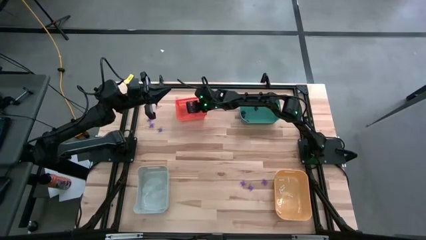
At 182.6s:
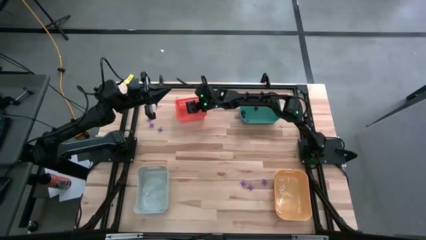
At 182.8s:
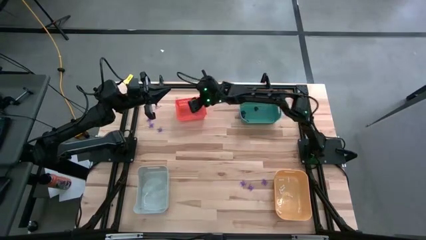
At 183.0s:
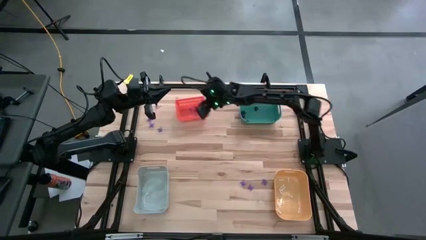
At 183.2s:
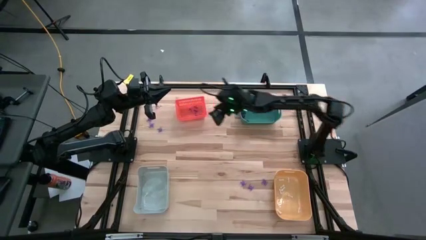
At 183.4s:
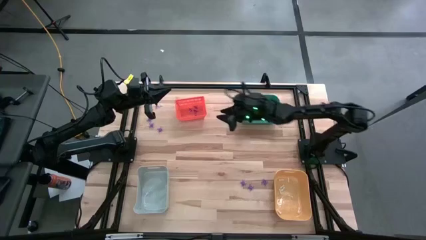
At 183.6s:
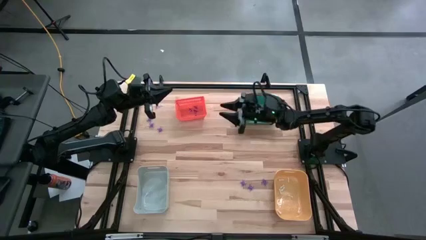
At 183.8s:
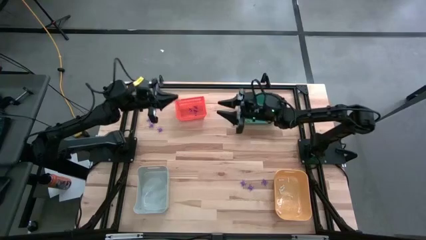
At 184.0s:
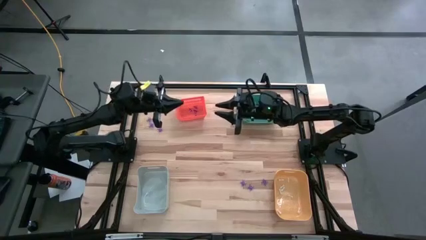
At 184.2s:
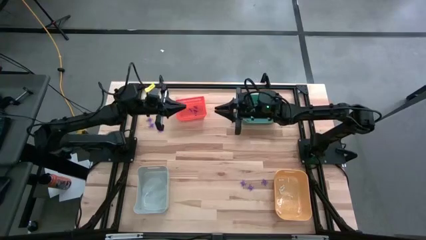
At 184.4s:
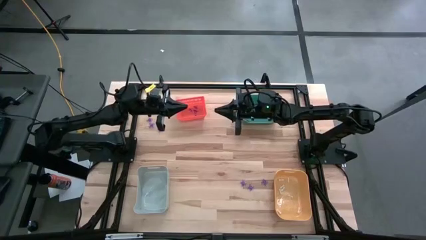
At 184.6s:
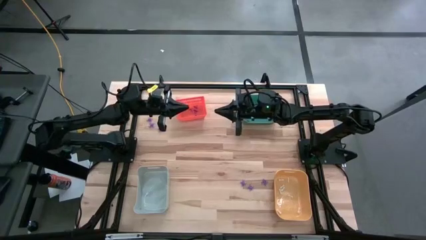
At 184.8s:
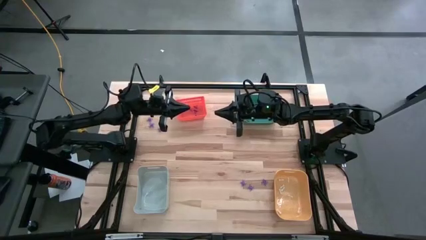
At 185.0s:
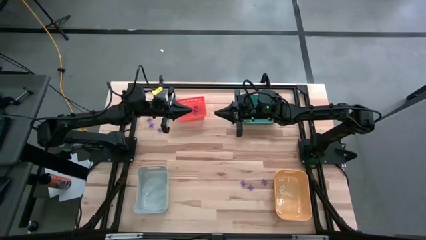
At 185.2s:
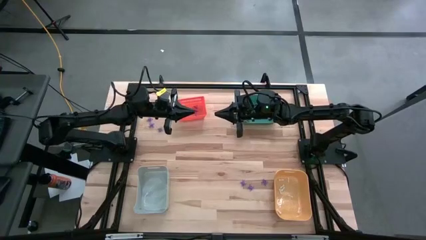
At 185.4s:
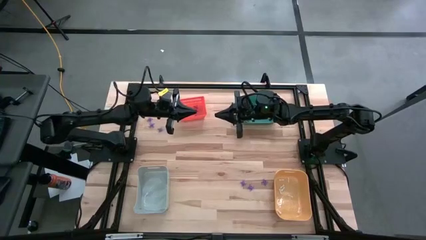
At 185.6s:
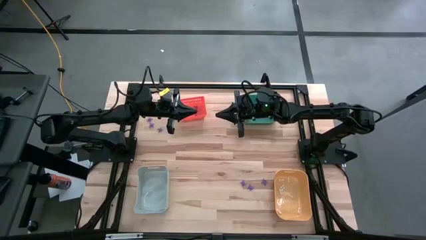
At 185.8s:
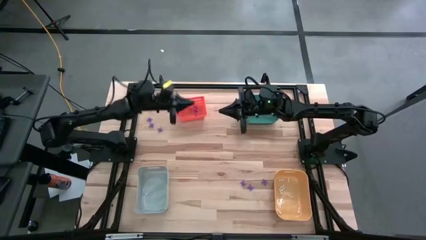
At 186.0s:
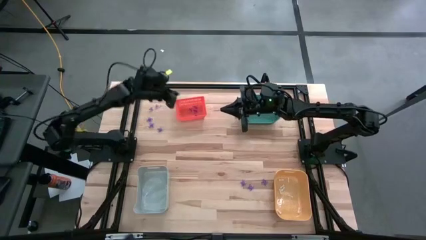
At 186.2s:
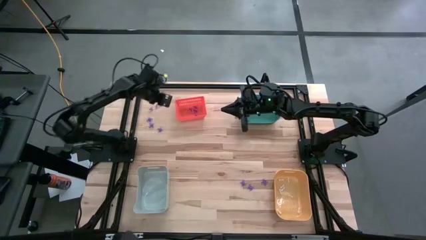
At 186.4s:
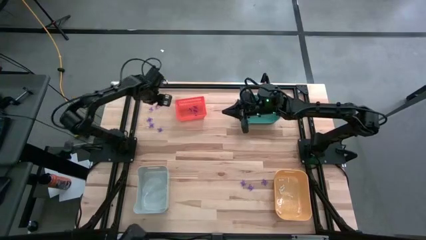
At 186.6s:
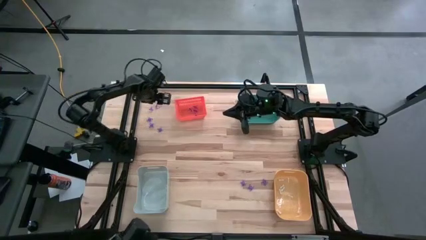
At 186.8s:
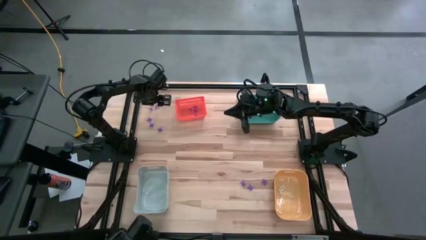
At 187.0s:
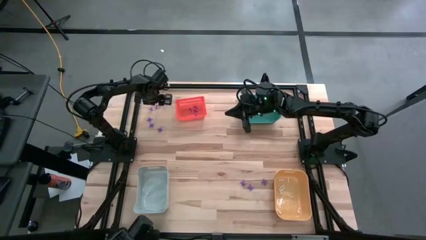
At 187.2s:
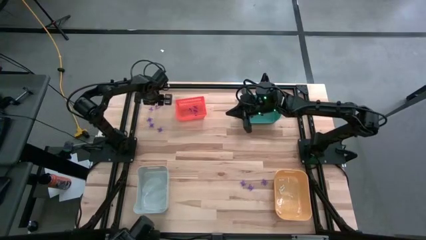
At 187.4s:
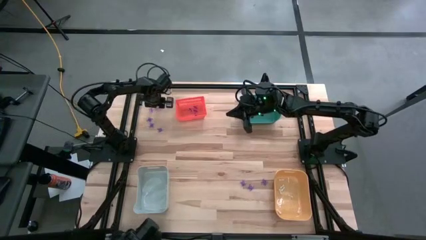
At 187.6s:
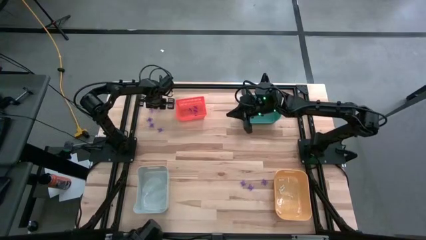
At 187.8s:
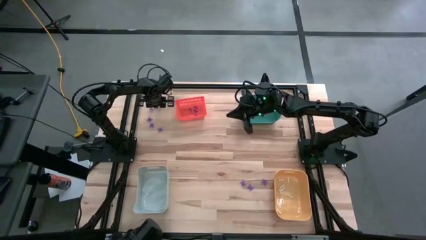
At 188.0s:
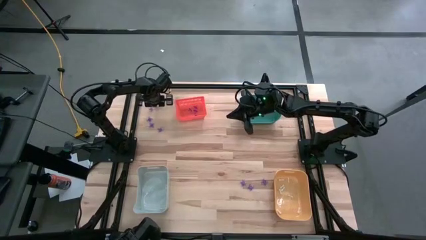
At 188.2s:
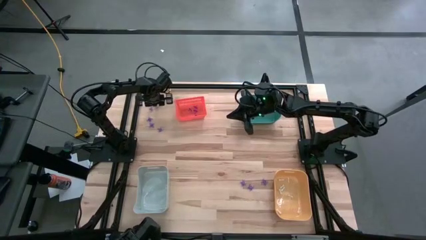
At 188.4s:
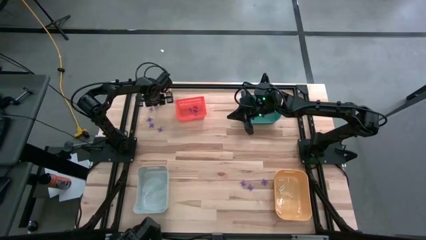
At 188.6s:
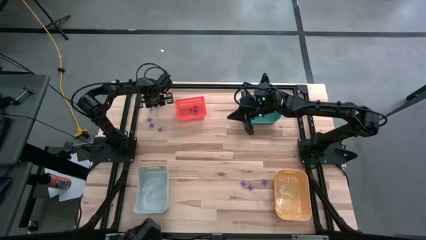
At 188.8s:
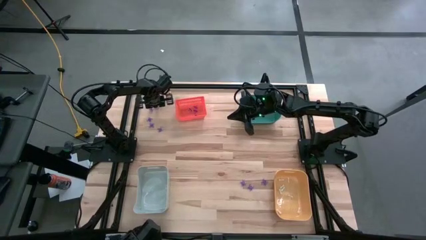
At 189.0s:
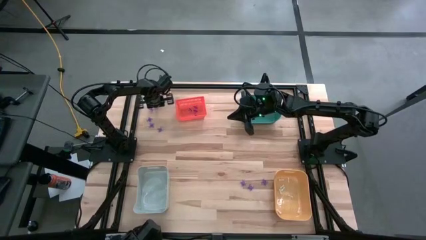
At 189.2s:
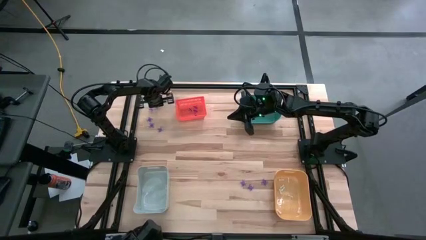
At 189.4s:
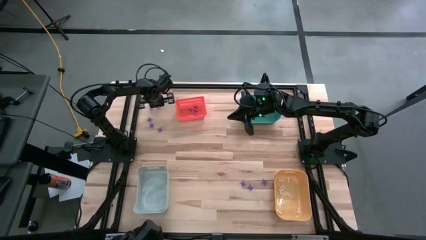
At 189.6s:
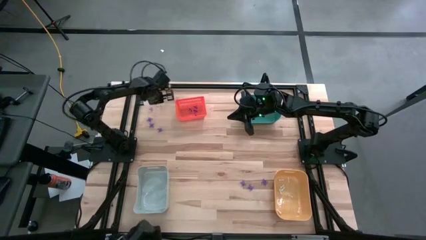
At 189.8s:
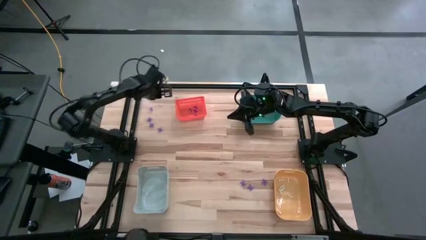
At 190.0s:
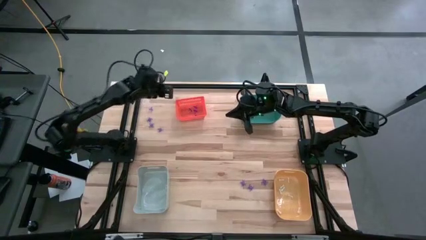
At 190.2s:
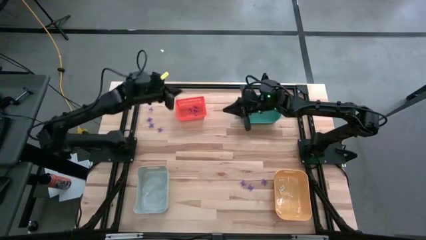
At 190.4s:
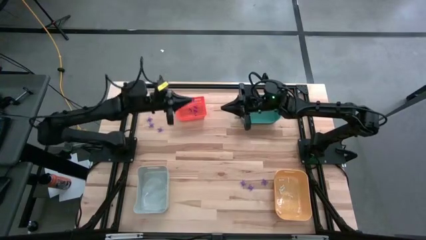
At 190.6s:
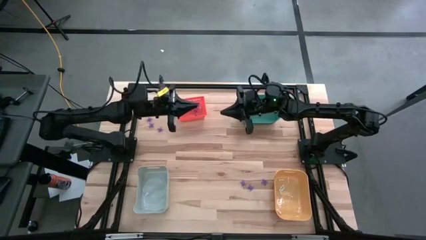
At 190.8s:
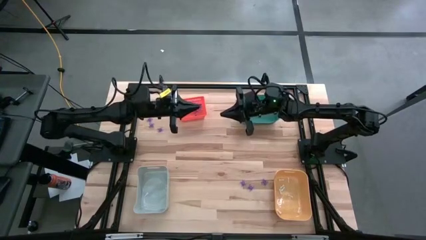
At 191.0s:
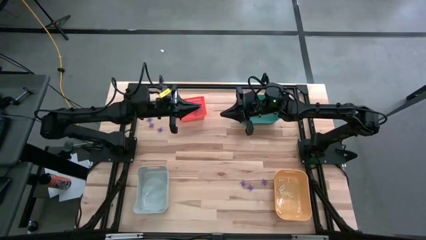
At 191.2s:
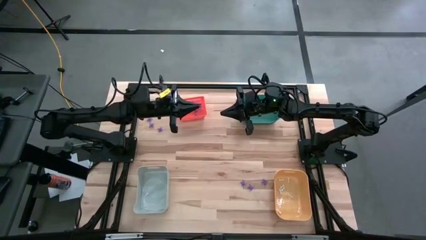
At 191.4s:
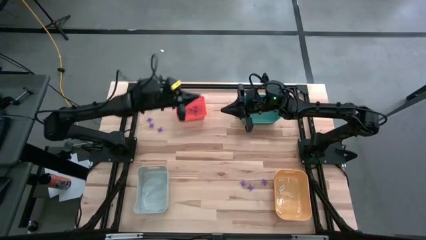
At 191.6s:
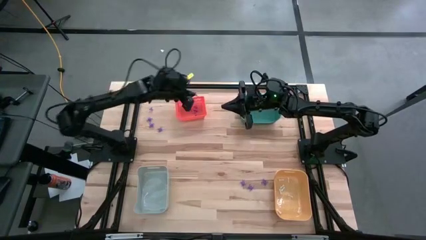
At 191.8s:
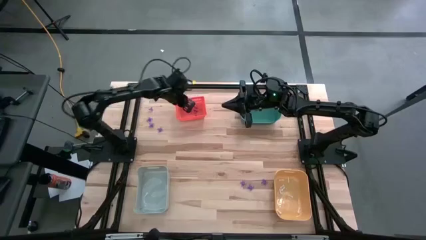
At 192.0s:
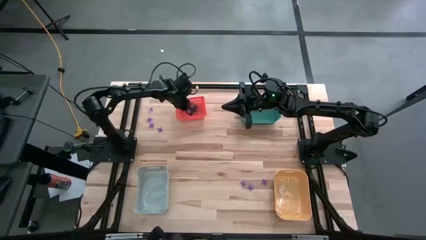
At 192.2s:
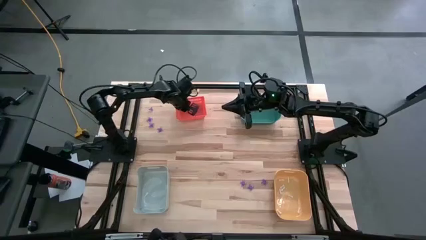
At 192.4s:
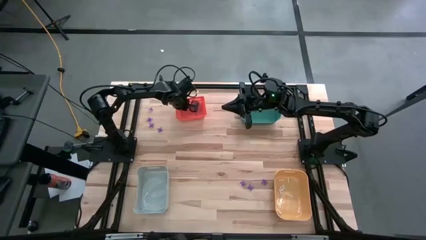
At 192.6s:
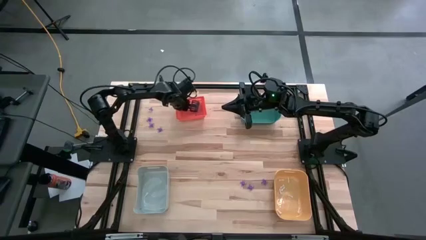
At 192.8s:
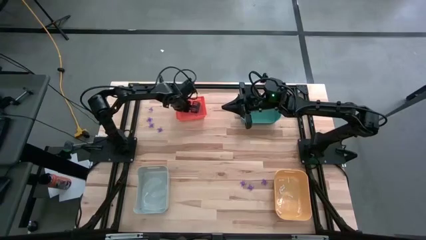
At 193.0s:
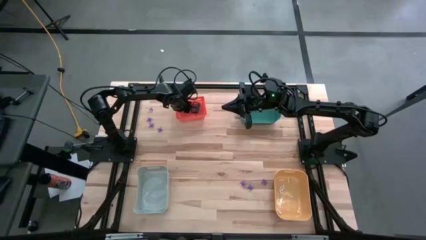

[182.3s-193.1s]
Task: Sort Halloween decoration
Put the purple witch hat toy into the orange bin

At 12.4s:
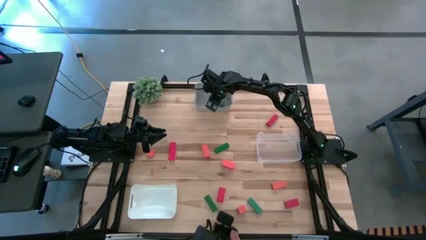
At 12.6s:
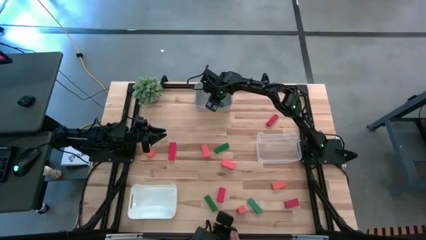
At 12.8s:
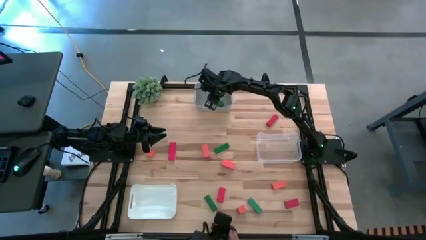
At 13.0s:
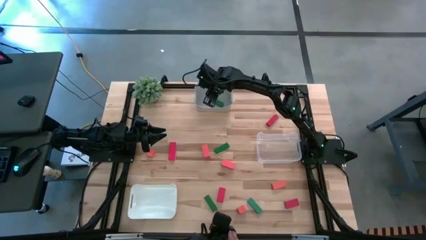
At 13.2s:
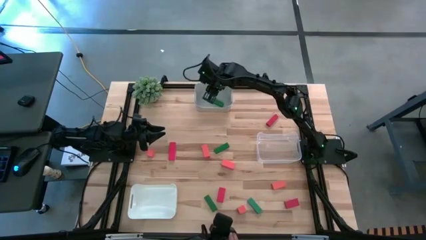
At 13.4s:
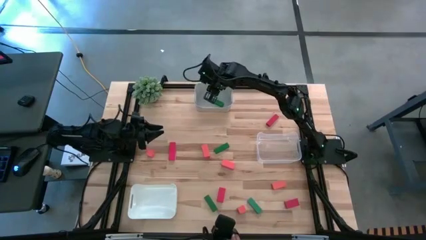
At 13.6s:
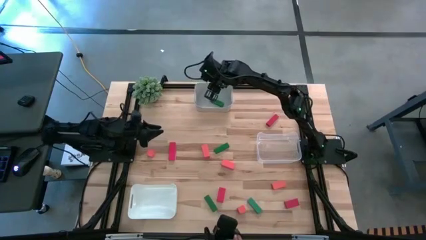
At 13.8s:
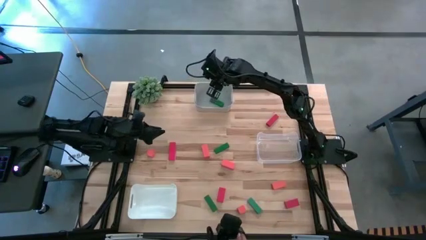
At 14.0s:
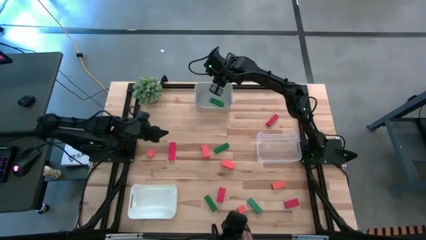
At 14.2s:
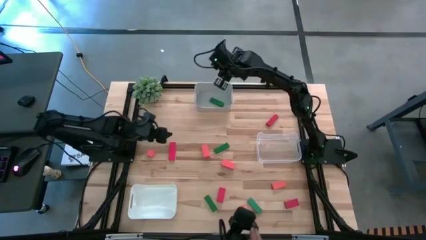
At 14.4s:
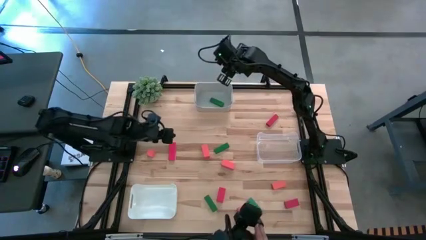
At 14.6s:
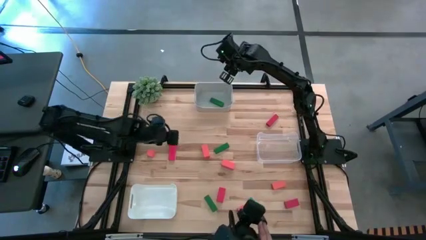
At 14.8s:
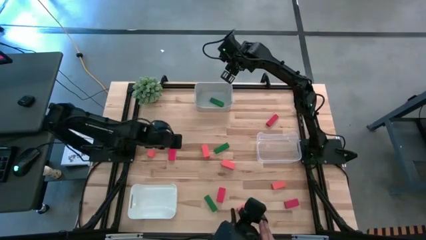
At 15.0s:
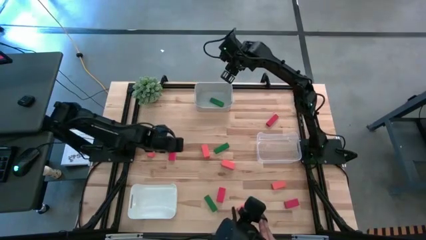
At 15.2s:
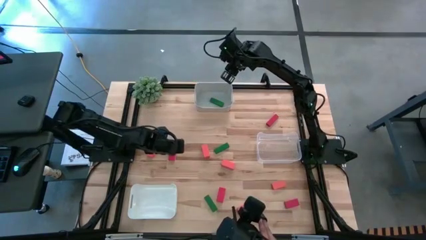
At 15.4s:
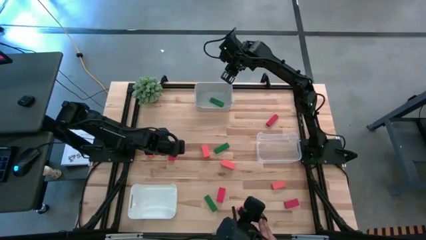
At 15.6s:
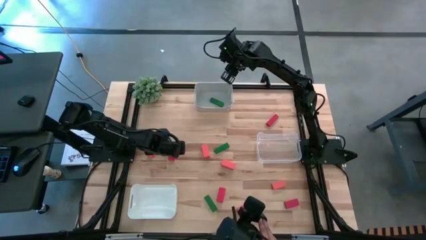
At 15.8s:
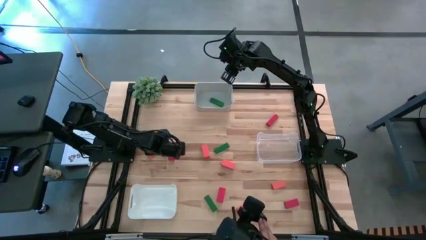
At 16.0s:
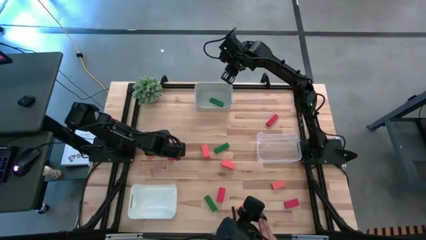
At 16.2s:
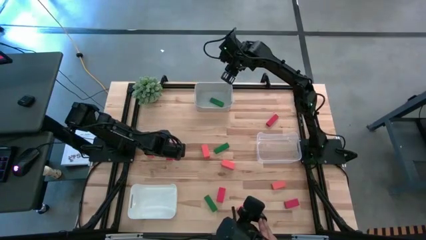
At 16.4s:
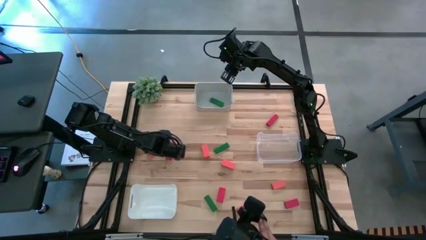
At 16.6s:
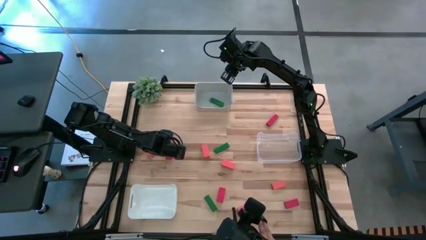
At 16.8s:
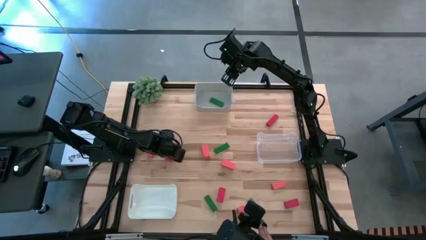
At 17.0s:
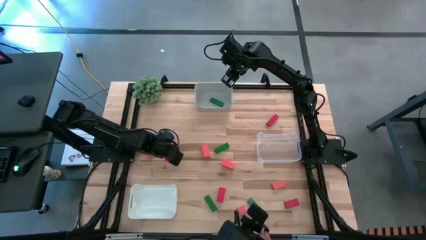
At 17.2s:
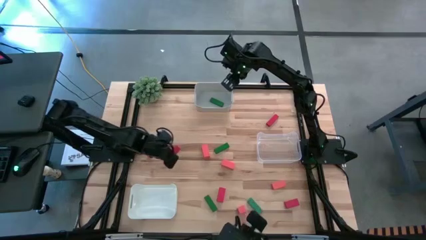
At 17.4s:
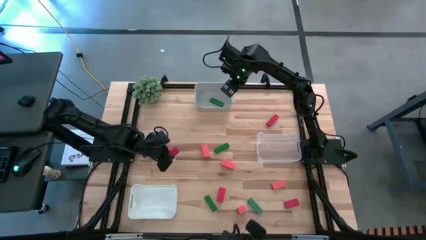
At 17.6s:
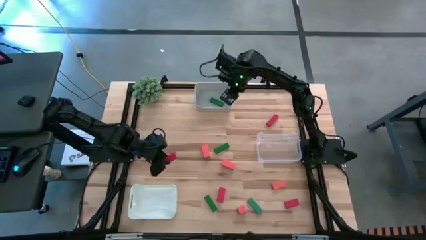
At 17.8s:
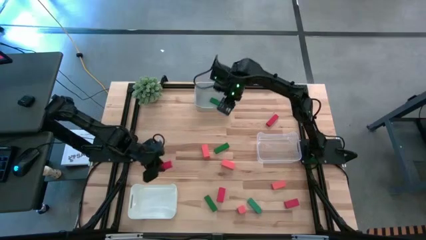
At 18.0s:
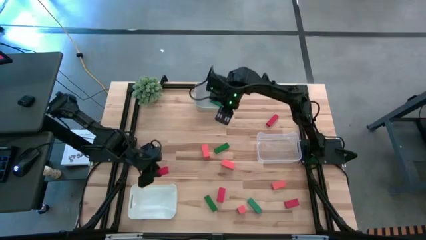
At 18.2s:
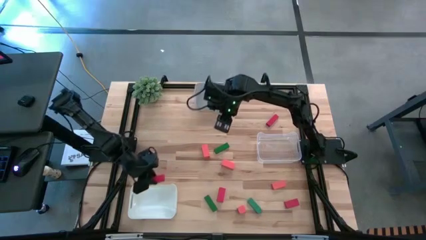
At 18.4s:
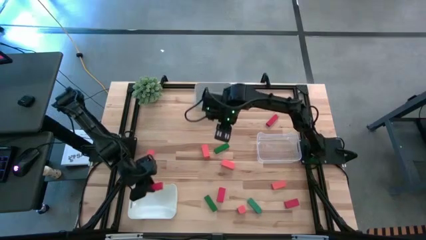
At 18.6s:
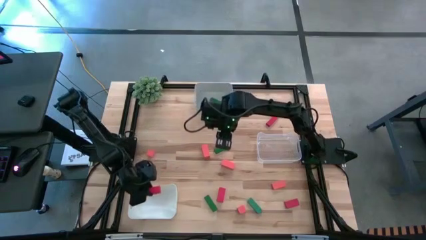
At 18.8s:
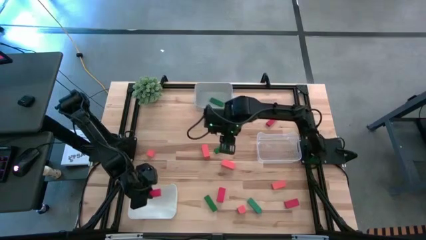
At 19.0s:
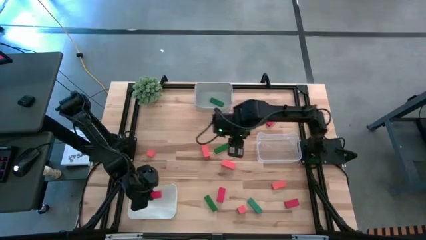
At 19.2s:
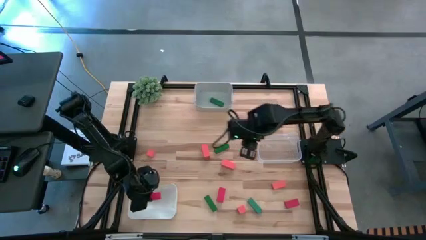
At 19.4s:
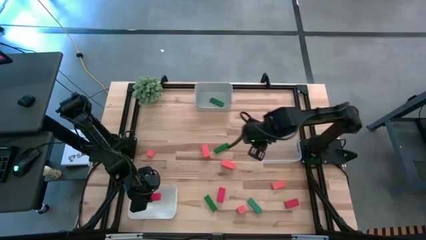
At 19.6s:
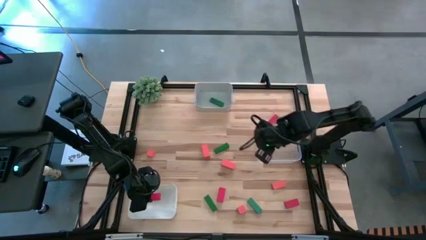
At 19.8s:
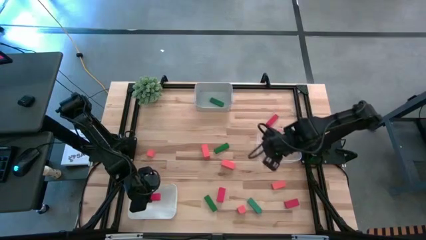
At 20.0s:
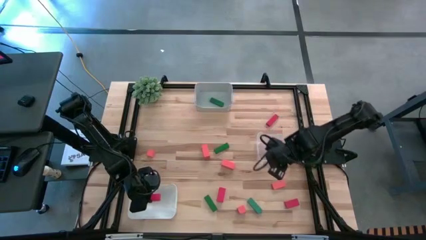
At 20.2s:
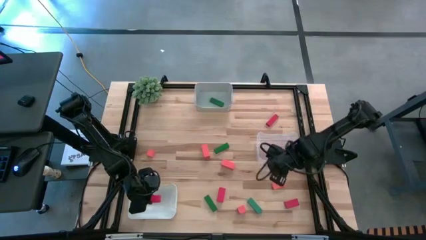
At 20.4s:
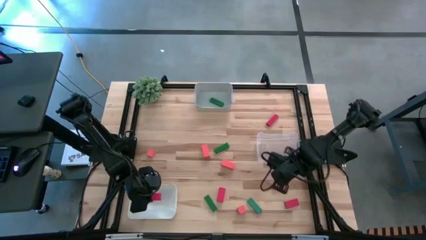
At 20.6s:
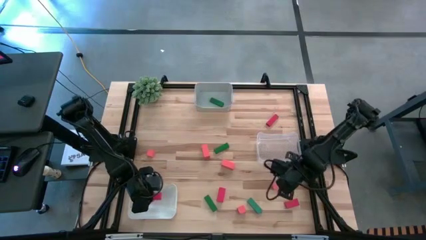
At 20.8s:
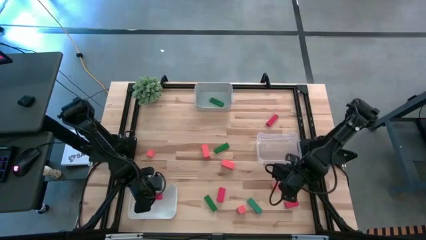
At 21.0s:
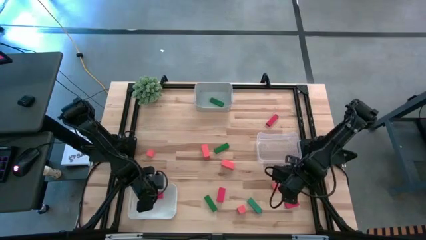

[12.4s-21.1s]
Task: Sort & place blocks by color
Put the red block into the white bin
